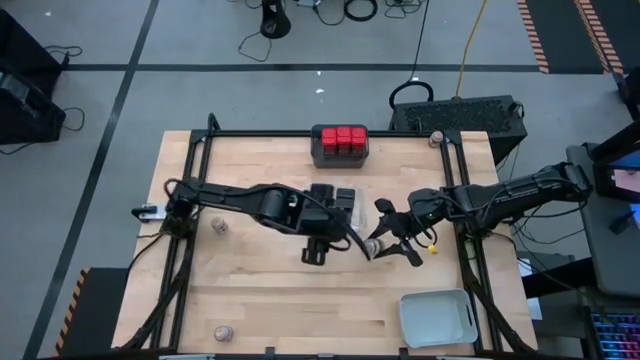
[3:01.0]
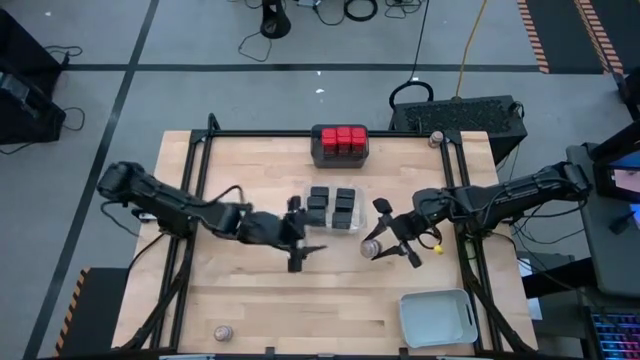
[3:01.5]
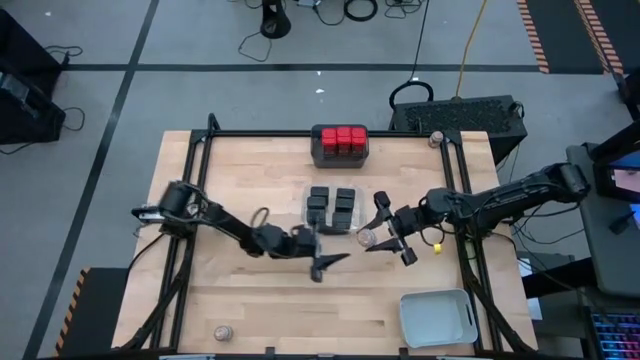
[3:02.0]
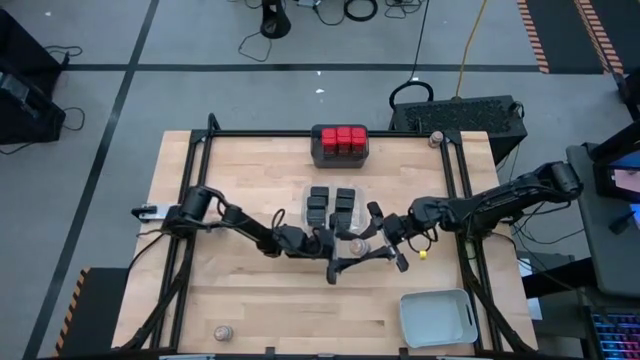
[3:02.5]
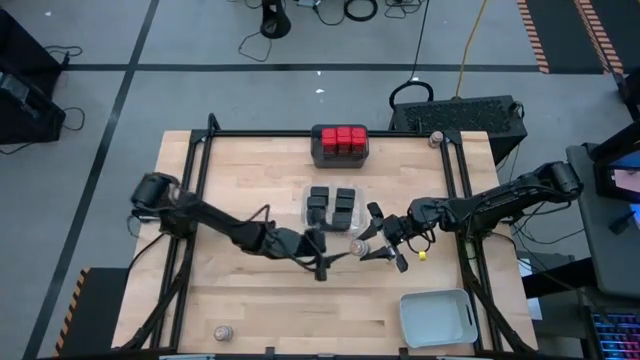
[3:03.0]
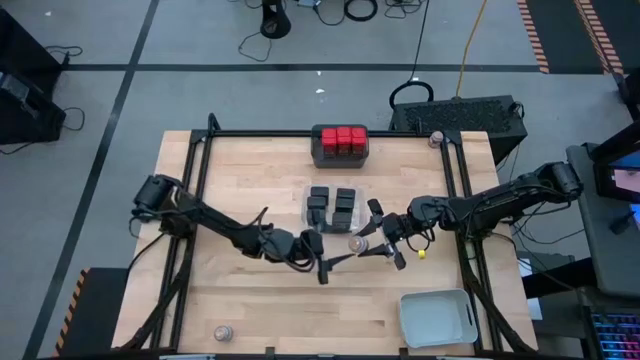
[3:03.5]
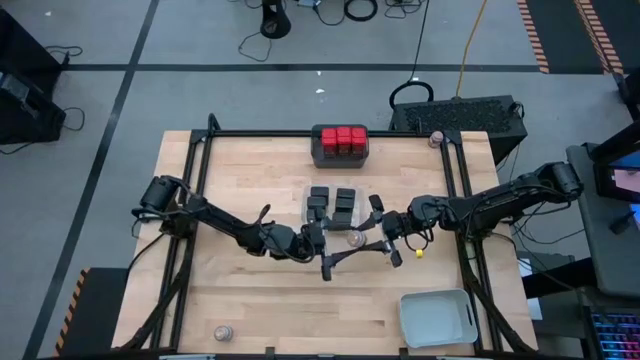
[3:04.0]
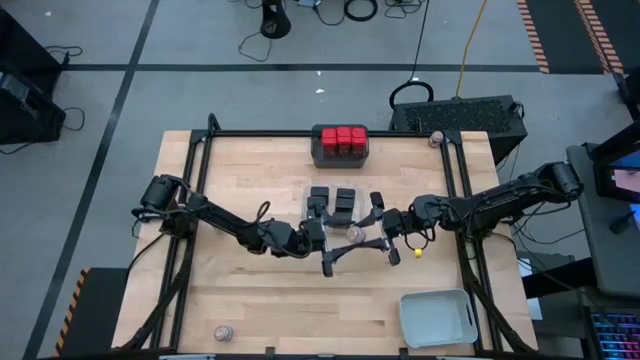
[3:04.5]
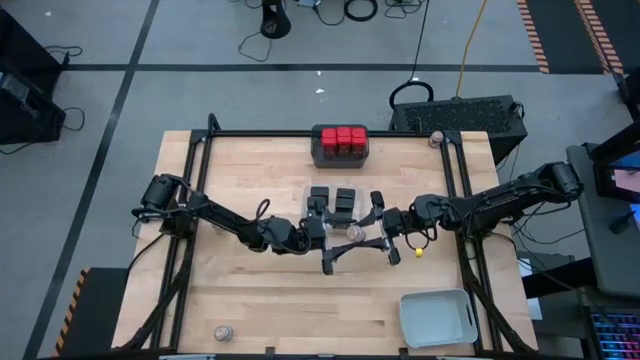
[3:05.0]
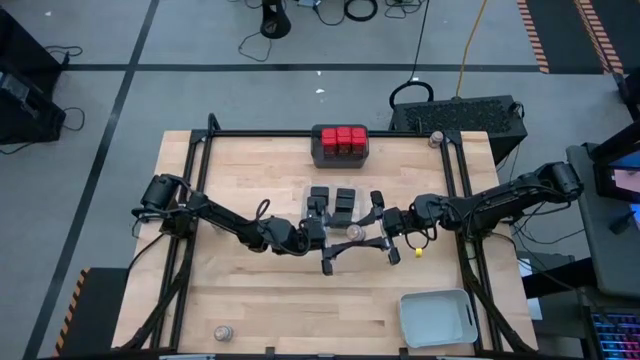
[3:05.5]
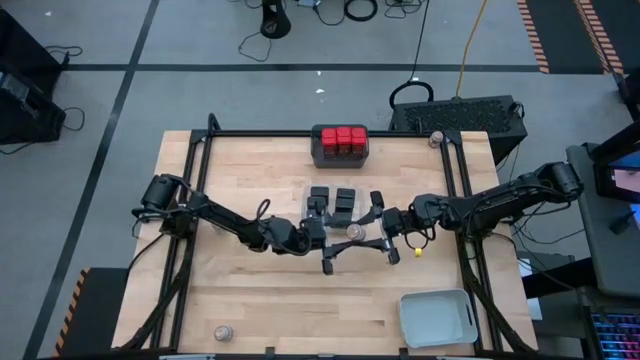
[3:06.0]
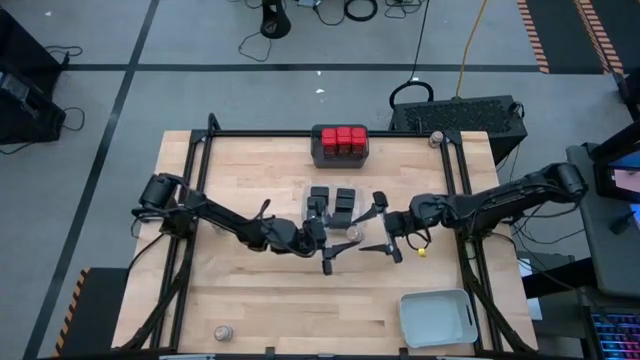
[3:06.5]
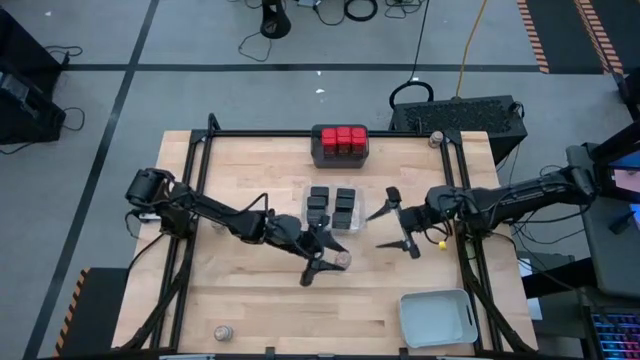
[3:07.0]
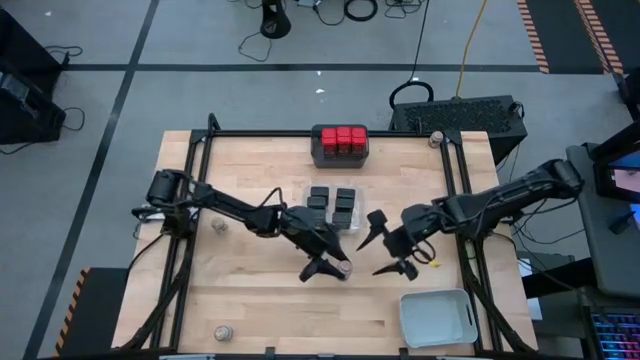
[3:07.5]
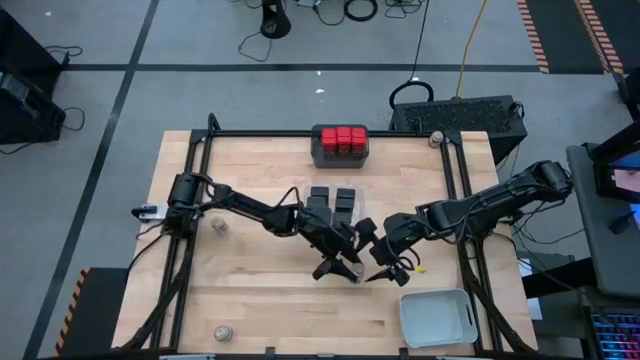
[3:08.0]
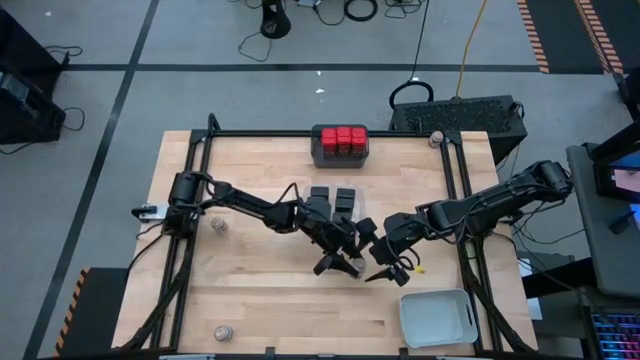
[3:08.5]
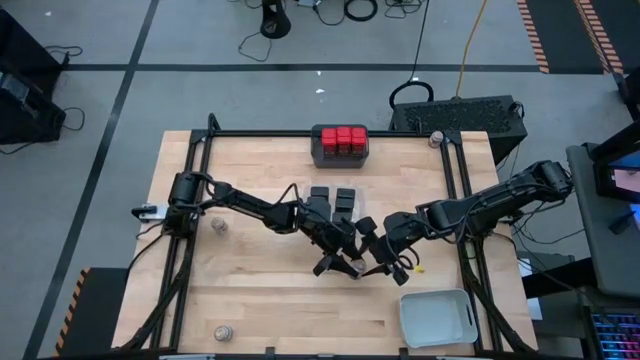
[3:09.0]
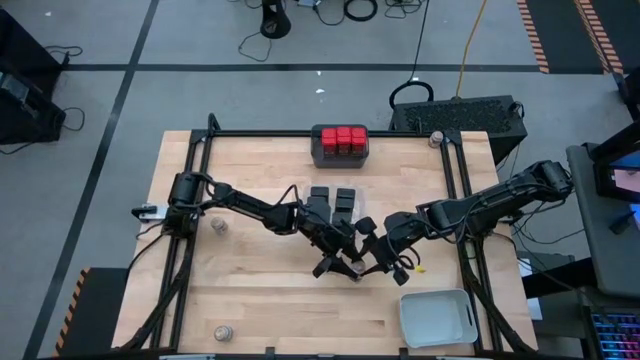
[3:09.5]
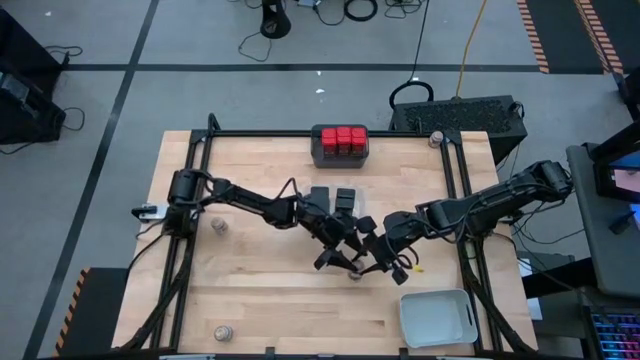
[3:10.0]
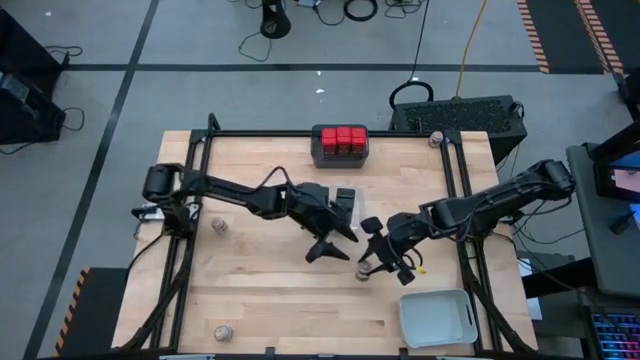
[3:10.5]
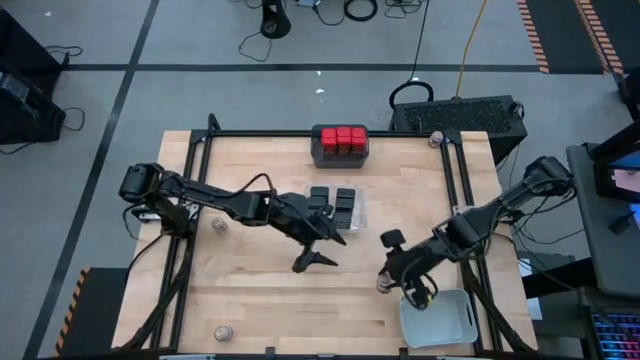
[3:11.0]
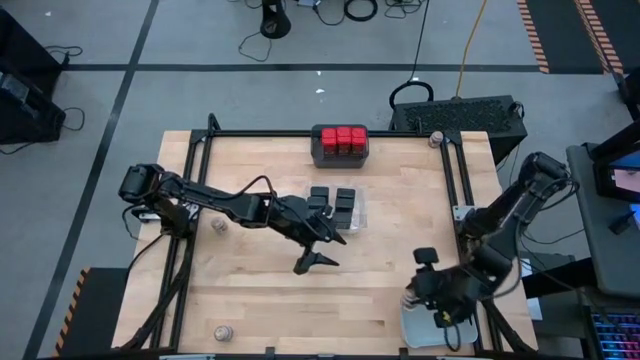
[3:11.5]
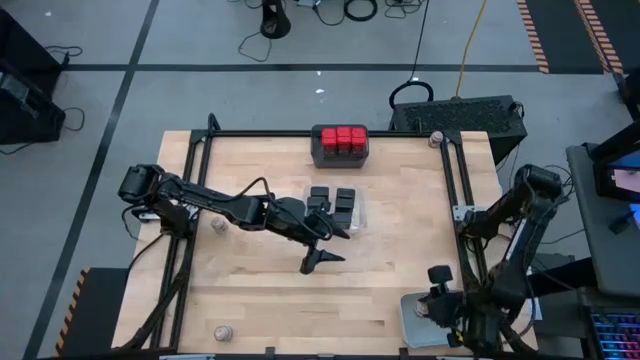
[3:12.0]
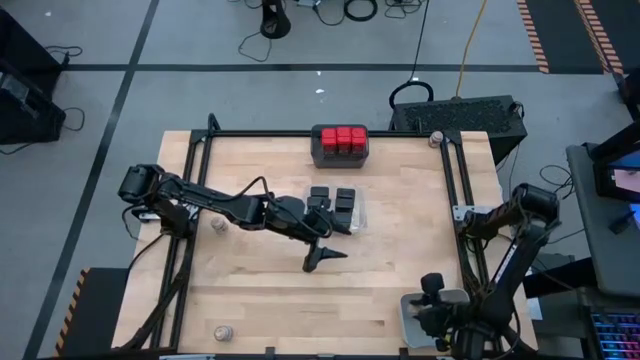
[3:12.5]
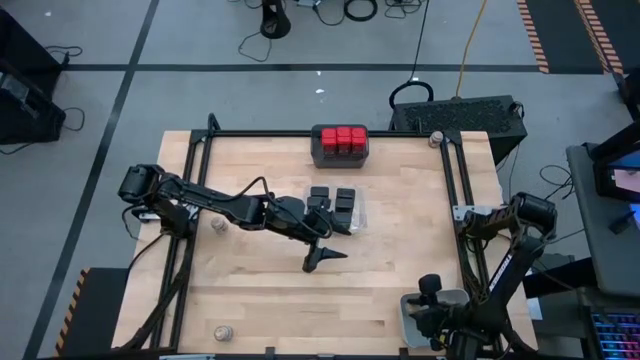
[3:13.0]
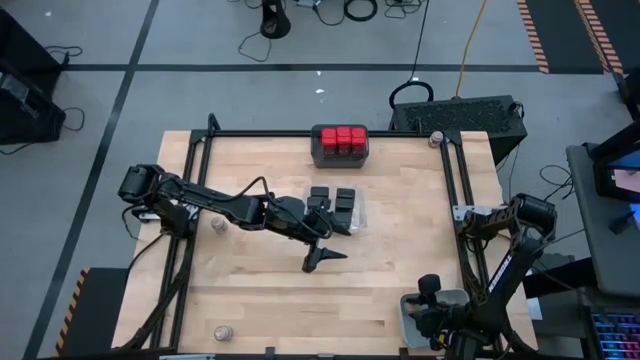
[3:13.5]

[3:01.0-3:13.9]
Task: Sort spices by type
Put the brown seasoning into the white bin

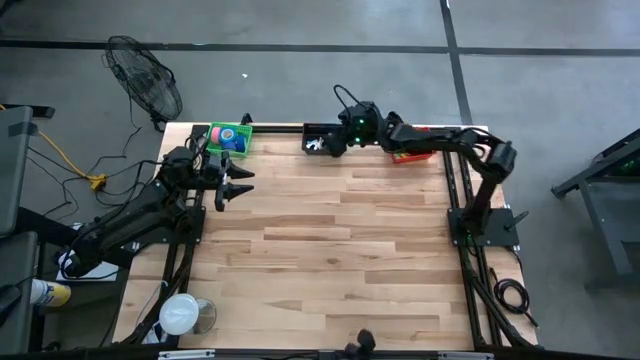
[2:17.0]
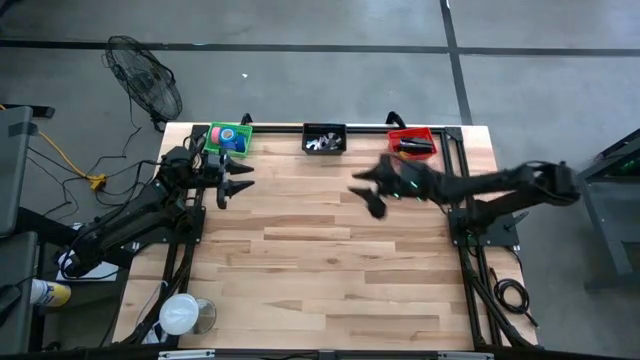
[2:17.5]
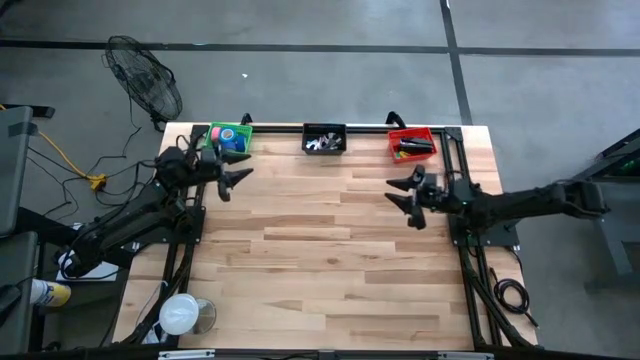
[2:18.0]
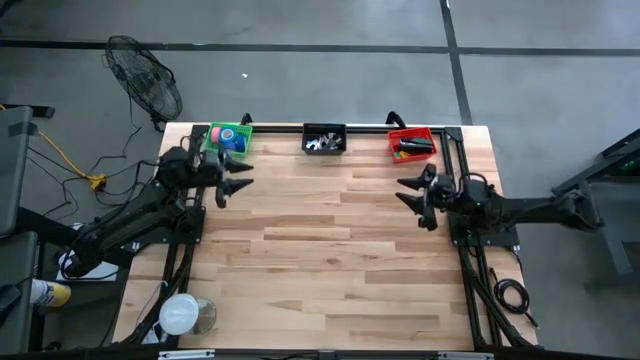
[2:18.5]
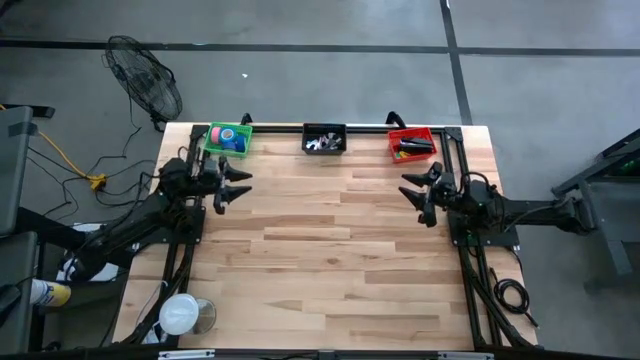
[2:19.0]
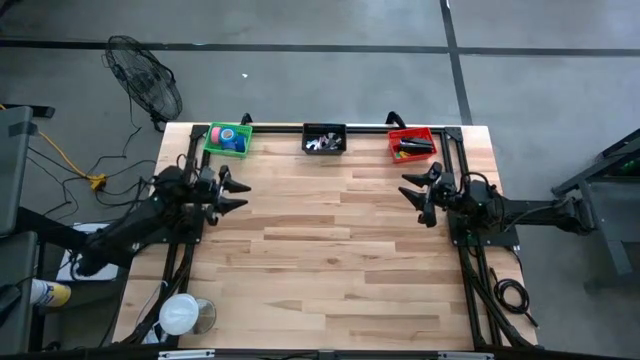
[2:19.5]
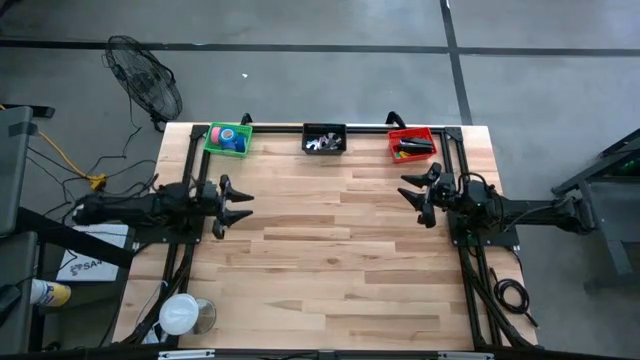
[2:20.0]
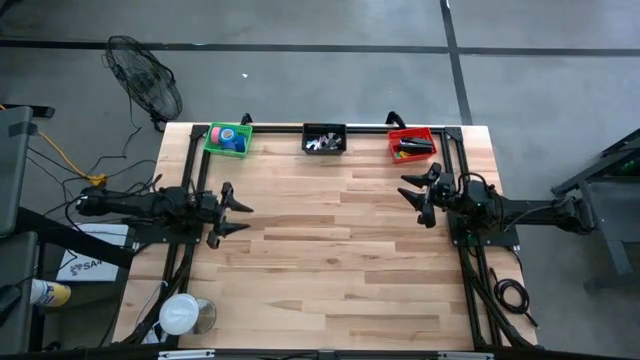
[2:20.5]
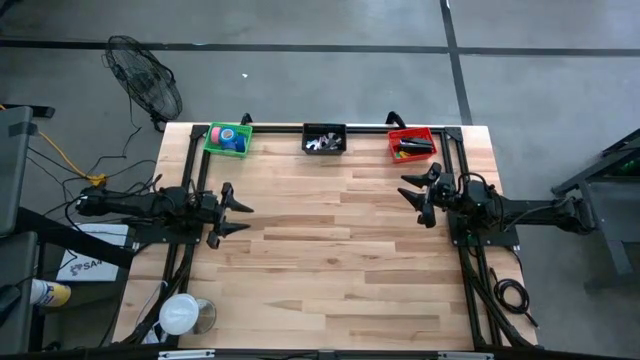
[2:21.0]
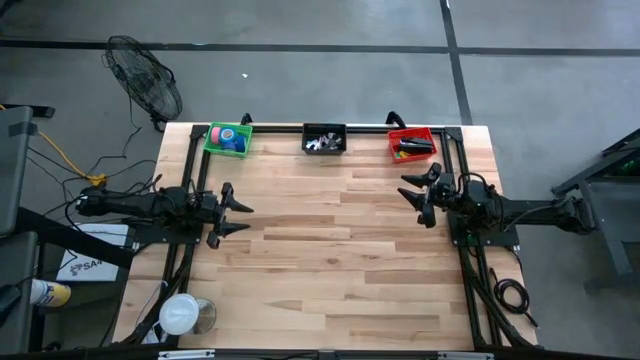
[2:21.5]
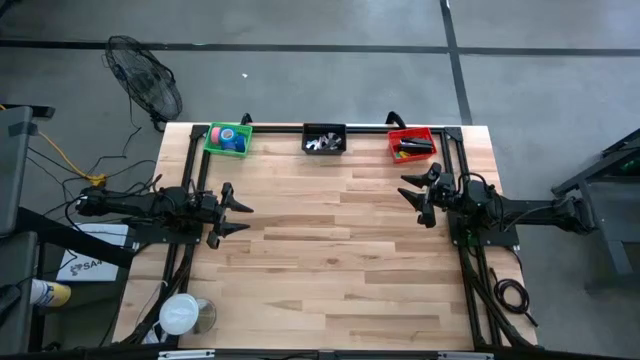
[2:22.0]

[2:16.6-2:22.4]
Task: Pick and place Stapler, Stapler remover, tape
Return to Home Position

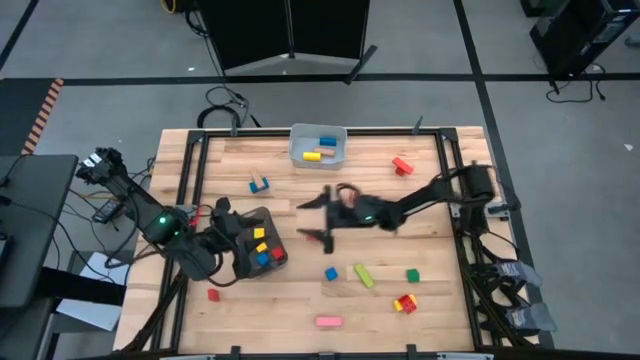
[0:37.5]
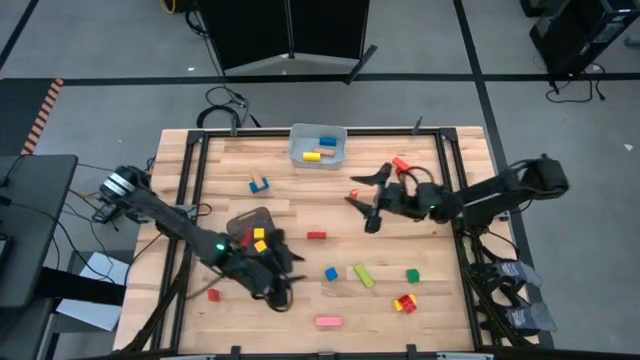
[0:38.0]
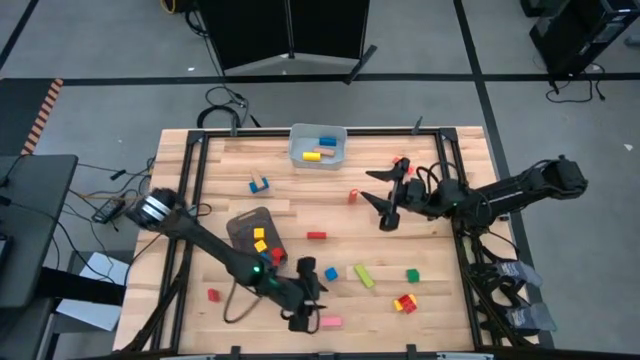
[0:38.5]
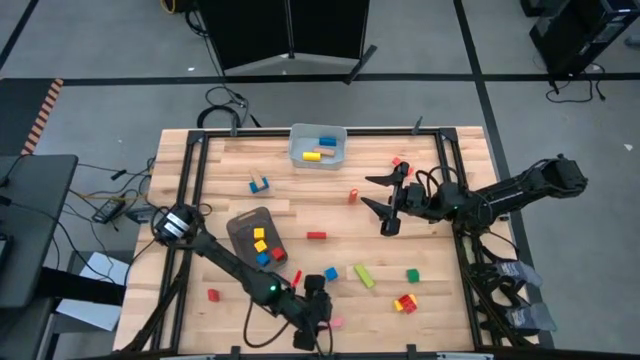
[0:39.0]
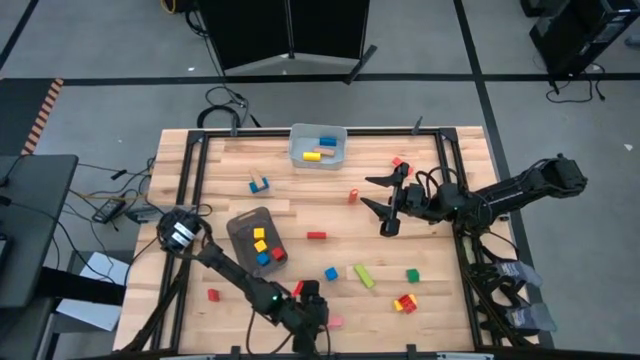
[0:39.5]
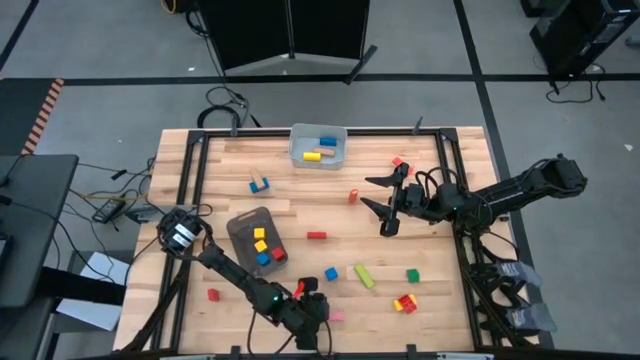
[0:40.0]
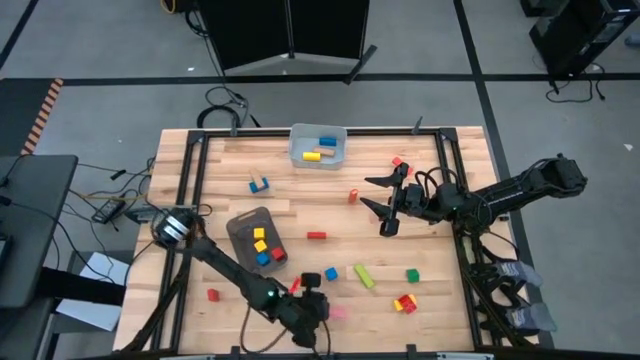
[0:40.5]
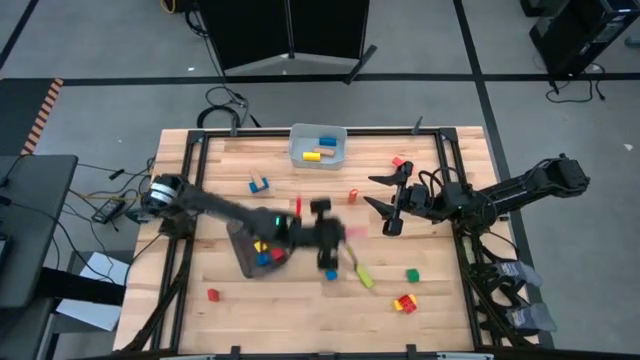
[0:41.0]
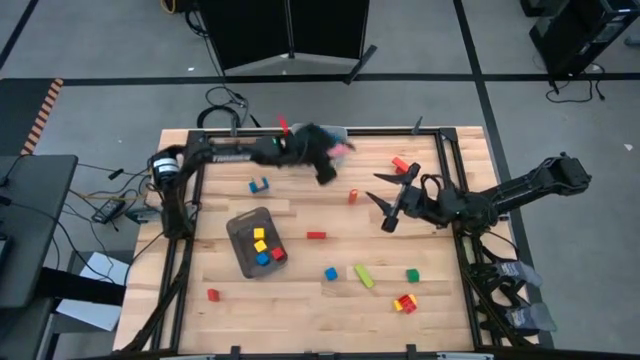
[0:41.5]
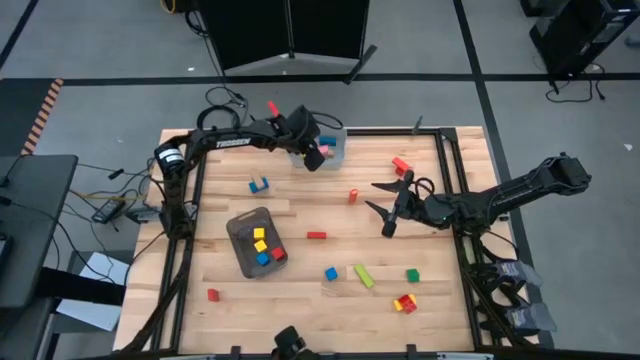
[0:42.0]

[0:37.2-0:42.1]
Task: Sort blocks by size
Put the pink rectangular block into the gray bin
